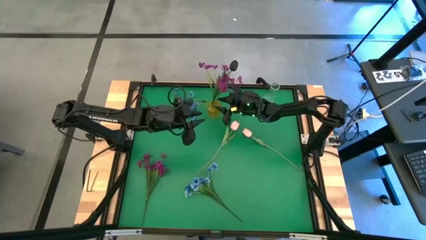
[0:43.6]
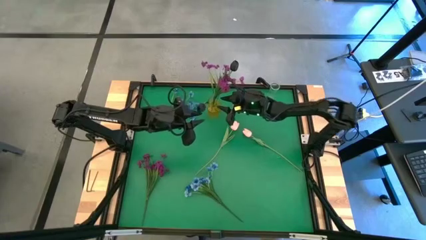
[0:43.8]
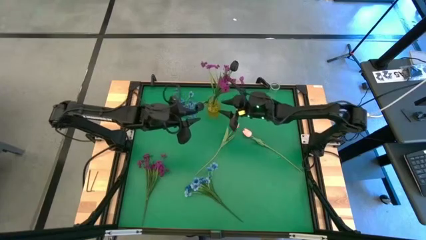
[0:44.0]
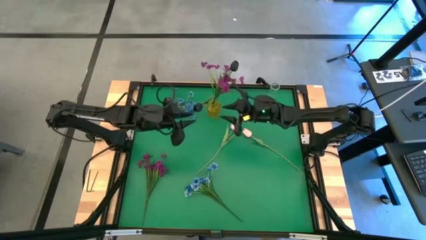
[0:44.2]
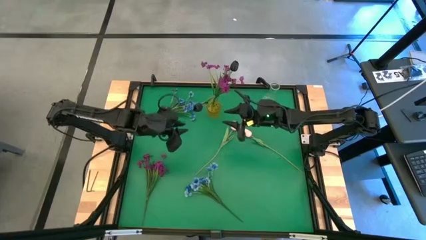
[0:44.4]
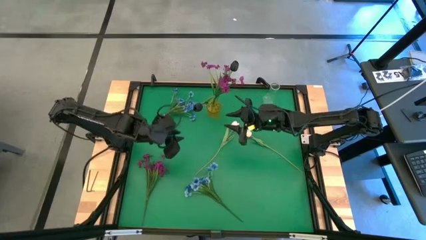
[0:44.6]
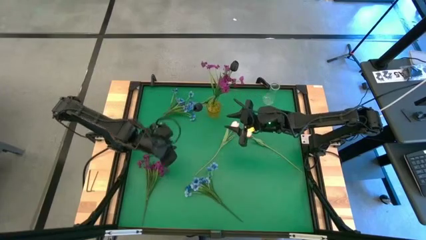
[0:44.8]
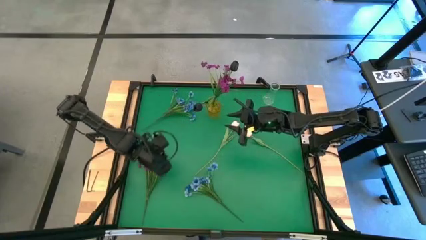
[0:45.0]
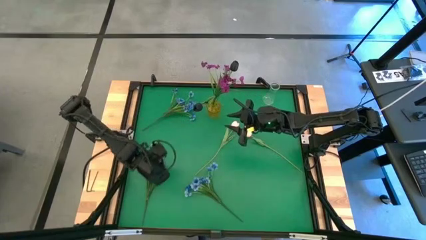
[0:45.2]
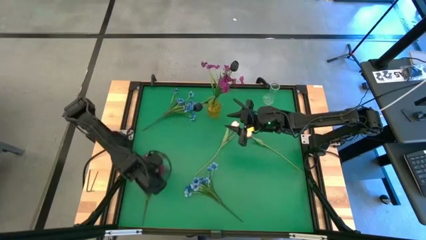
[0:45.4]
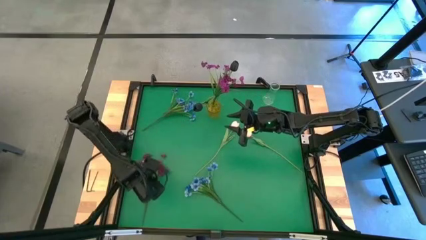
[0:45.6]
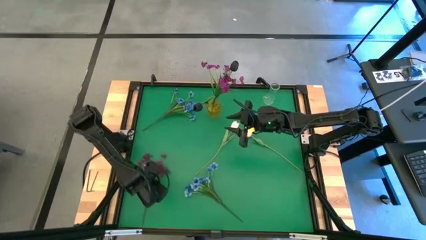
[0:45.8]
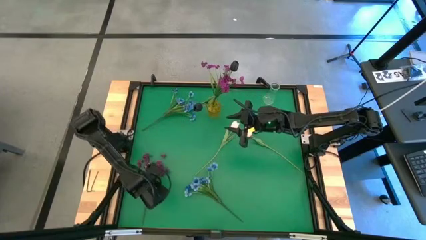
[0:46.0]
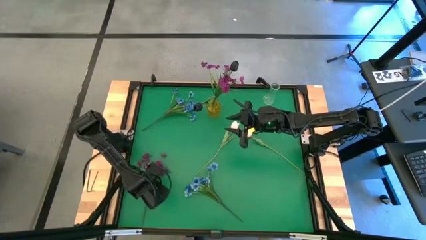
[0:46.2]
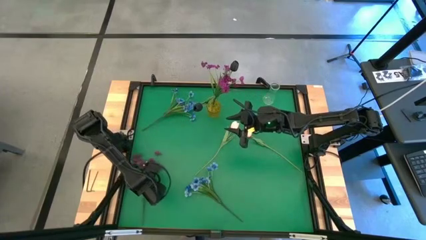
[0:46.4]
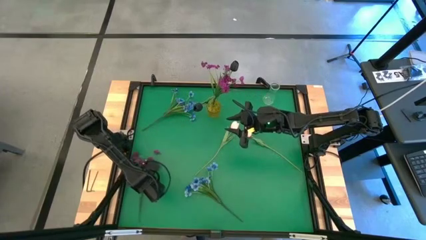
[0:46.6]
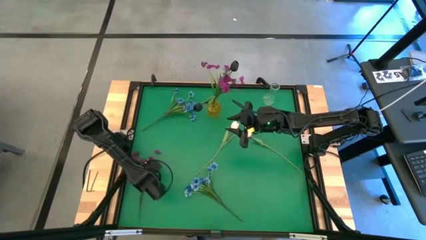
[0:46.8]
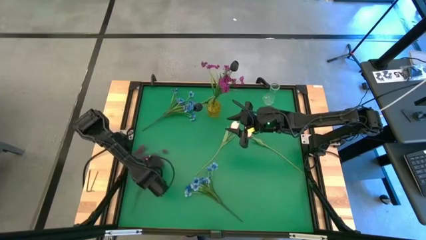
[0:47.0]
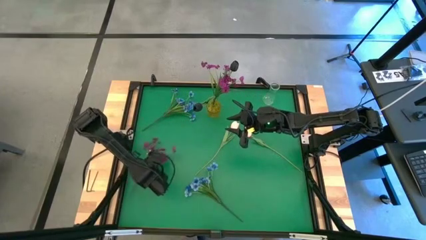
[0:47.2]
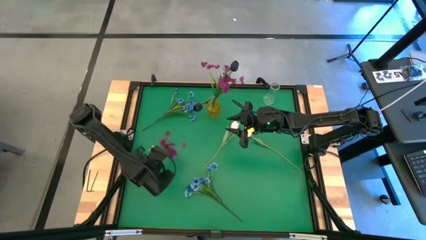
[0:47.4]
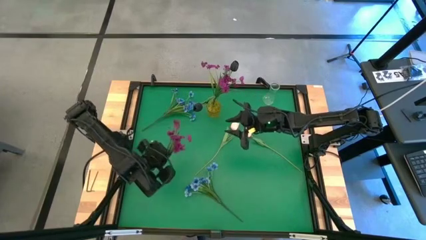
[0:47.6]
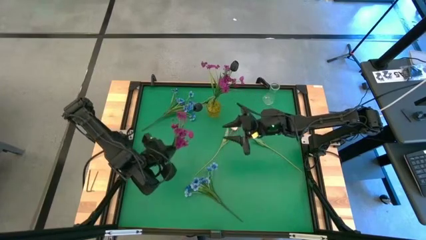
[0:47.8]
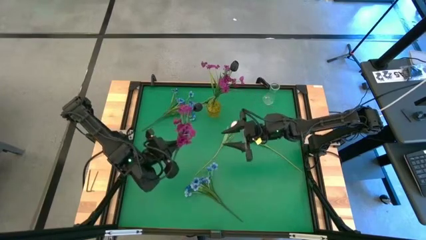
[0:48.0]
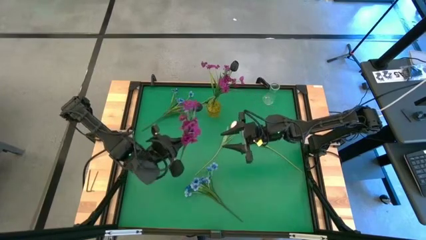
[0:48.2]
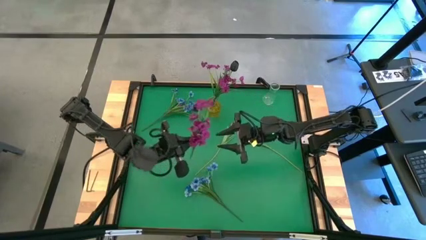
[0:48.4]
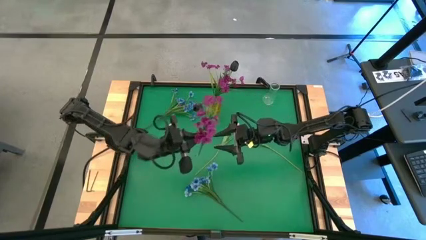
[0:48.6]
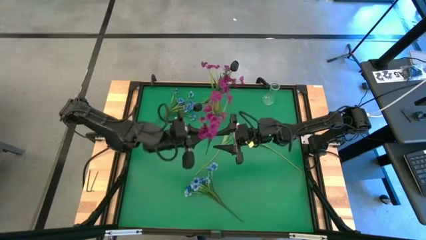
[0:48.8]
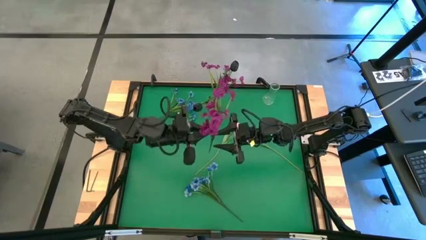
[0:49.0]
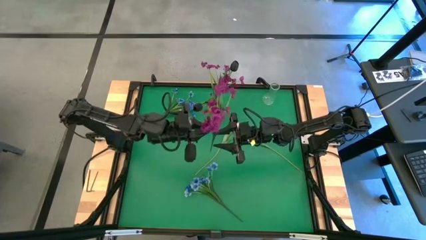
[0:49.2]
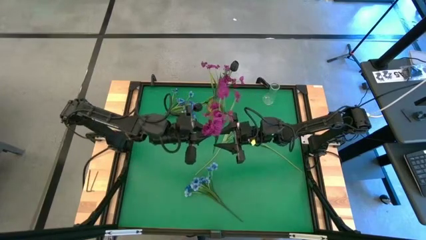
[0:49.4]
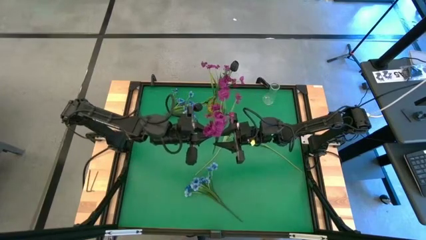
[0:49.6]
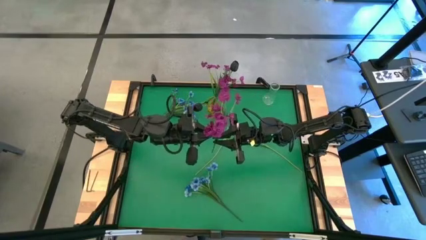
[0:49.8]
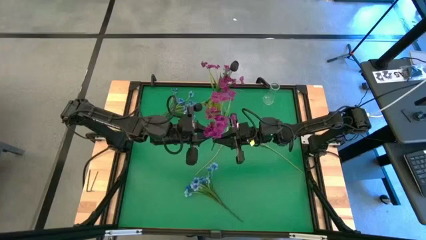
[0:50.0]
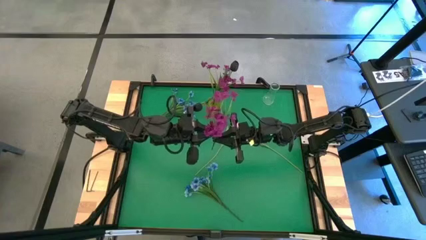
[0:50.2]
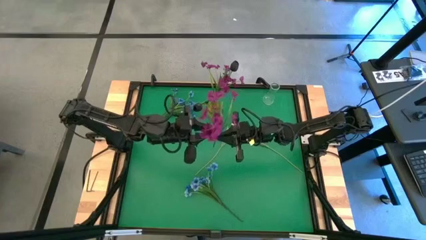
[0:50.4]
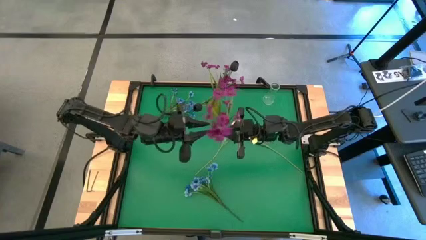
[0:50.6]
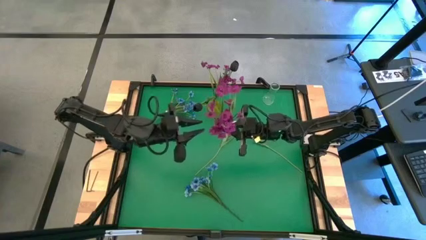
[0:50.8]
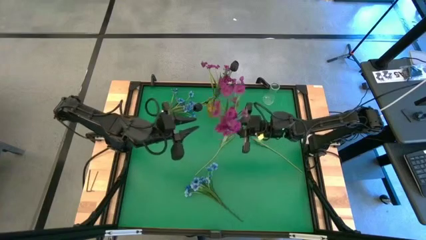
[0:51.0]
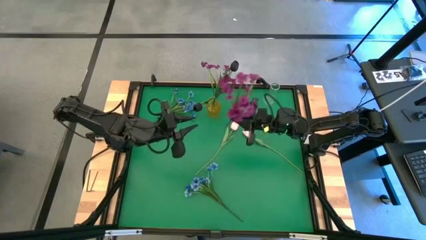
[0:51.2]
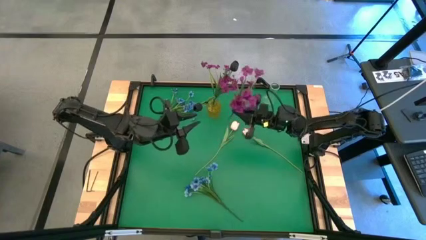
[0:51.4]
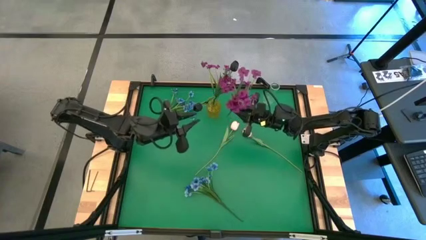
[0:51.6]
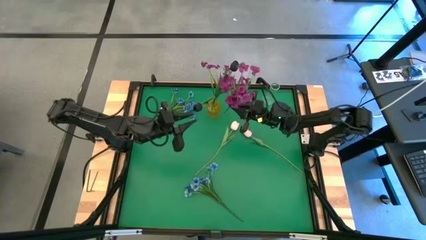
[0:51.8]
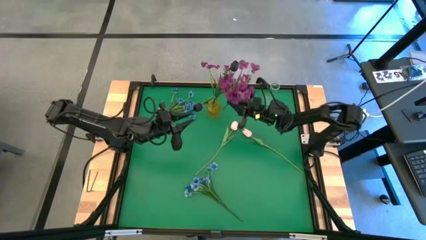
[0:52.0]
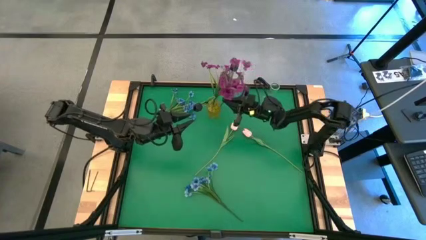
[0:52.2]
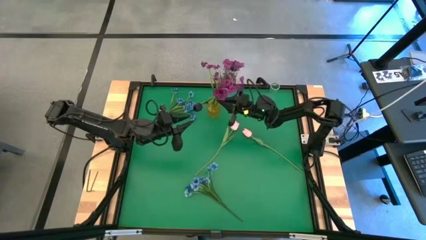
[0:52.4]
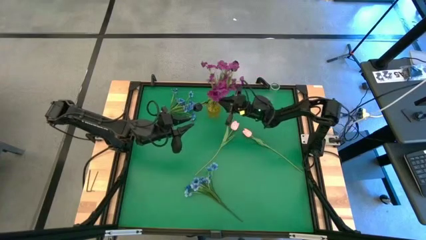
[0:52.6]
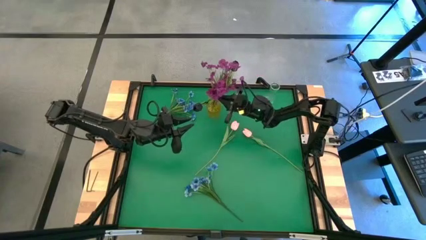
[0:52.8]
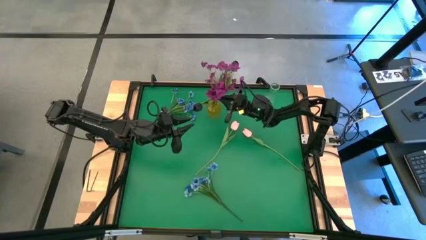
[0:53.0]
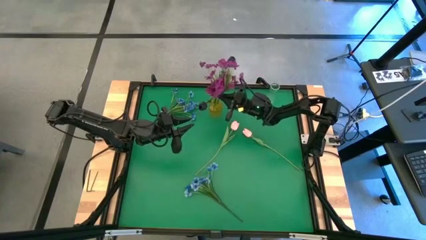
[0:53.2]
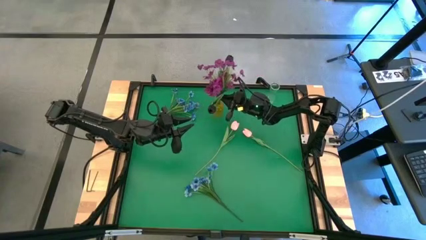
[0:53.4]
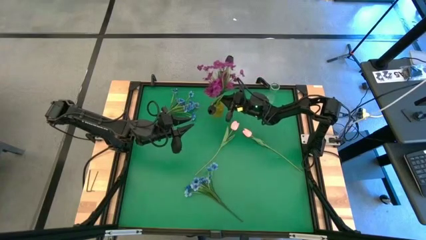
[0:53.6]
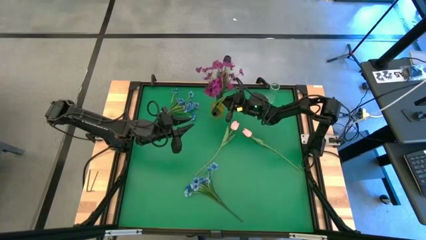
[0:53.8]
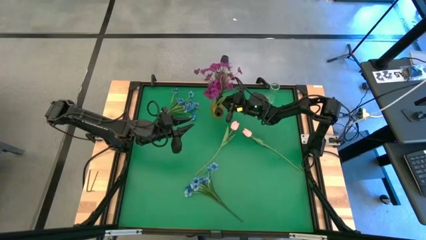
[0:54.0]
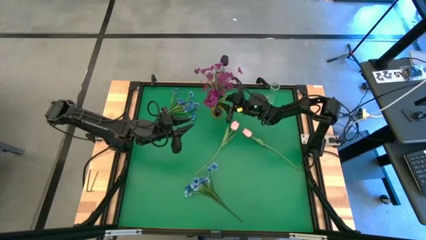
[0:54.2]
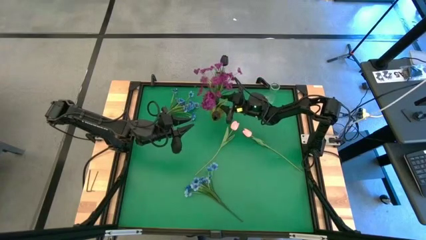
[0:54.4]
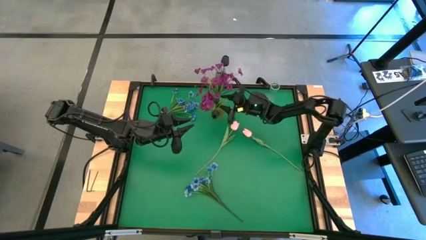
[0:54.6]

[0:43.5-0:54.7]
Task: Sort flowers into vase by color
Put the purple flowers into the yellow vase

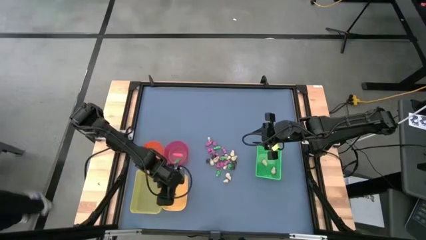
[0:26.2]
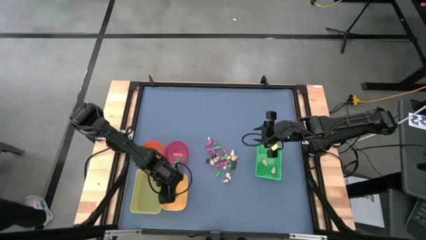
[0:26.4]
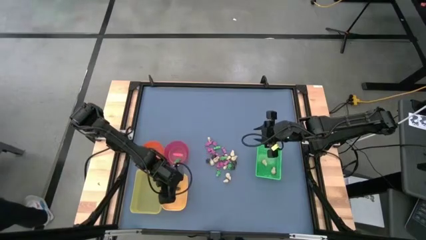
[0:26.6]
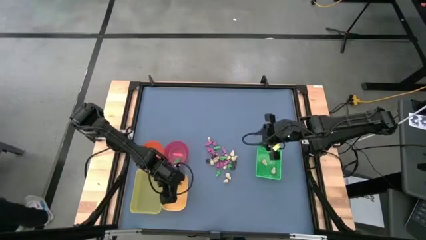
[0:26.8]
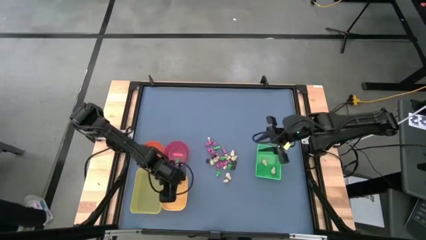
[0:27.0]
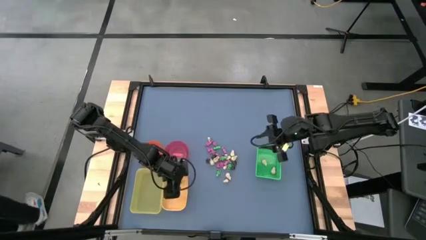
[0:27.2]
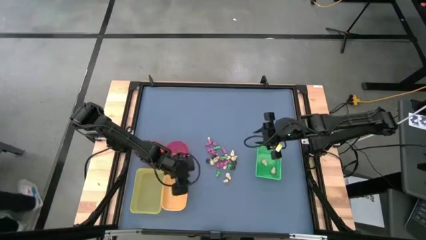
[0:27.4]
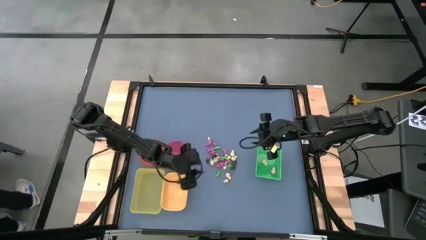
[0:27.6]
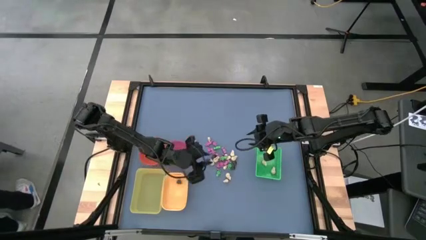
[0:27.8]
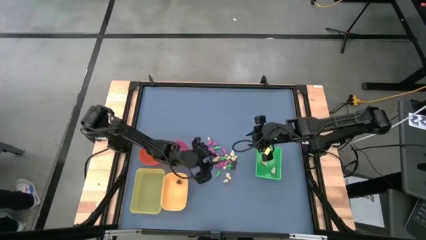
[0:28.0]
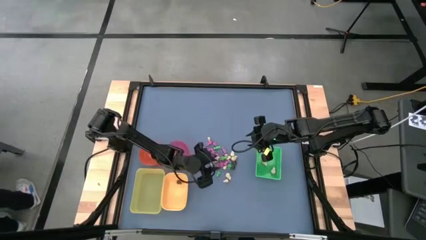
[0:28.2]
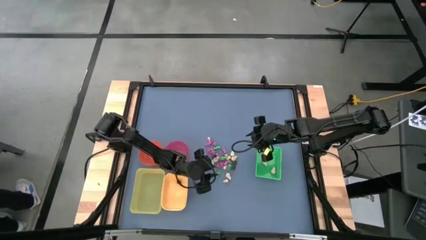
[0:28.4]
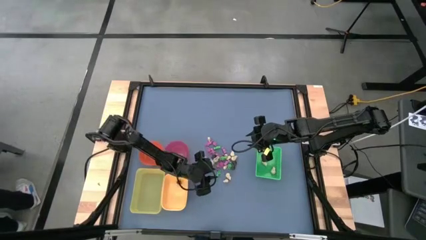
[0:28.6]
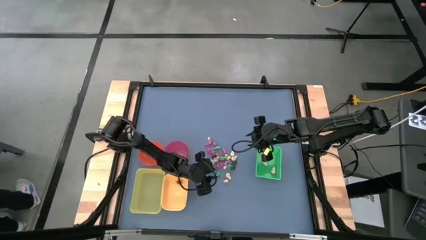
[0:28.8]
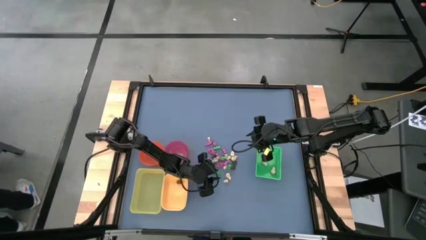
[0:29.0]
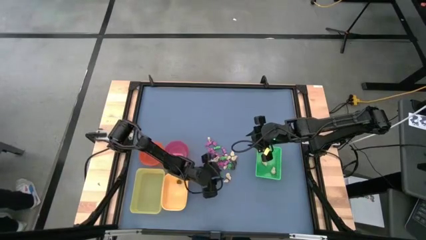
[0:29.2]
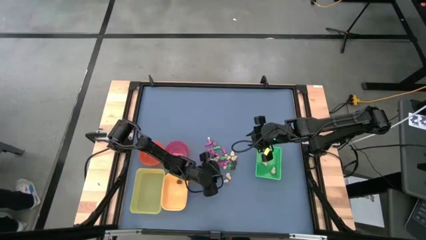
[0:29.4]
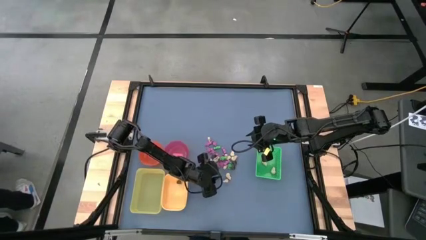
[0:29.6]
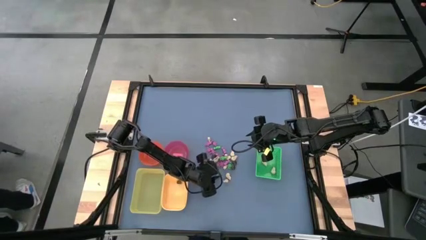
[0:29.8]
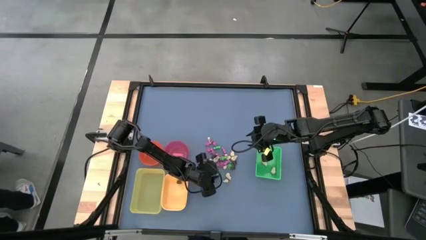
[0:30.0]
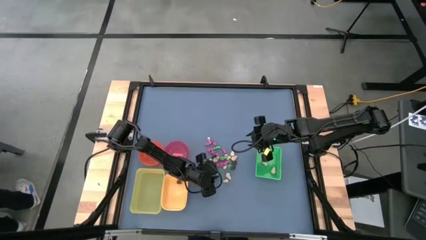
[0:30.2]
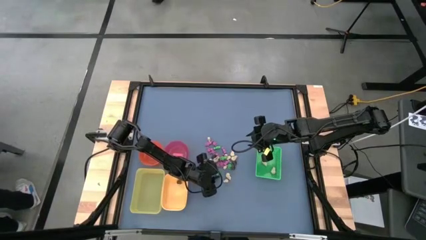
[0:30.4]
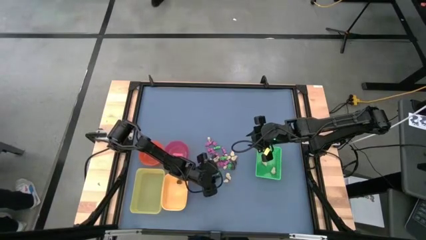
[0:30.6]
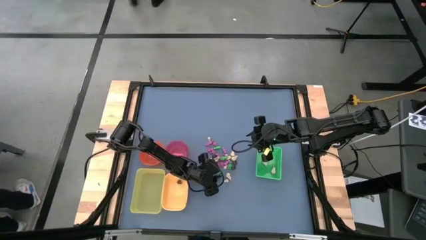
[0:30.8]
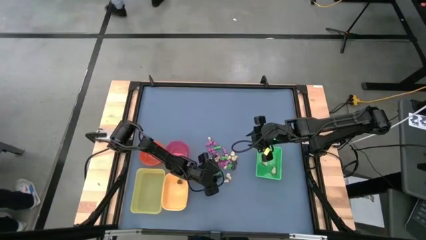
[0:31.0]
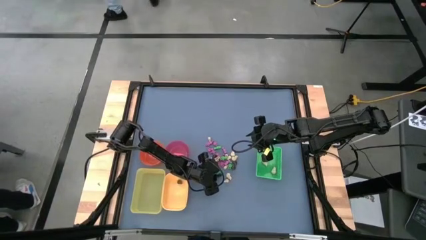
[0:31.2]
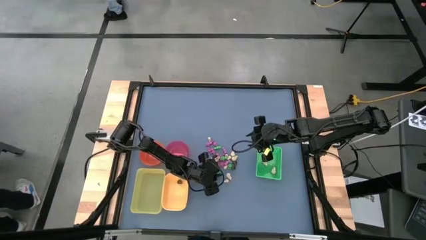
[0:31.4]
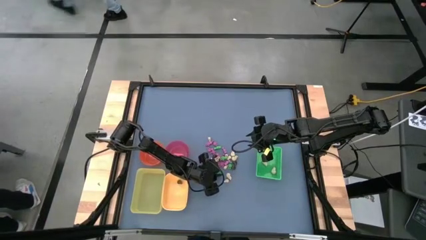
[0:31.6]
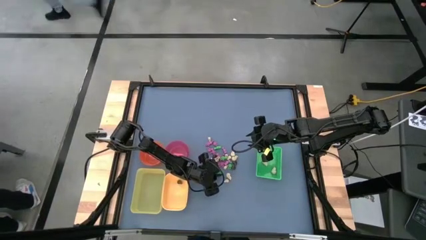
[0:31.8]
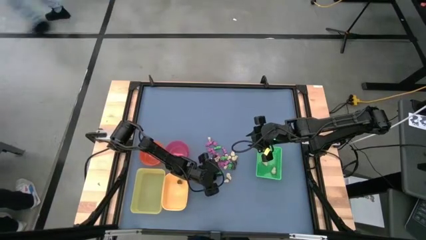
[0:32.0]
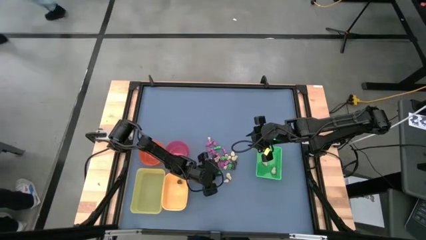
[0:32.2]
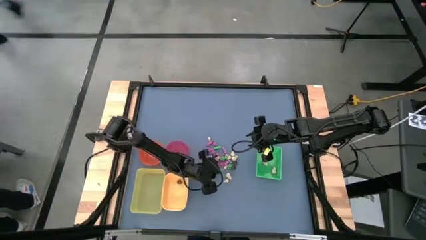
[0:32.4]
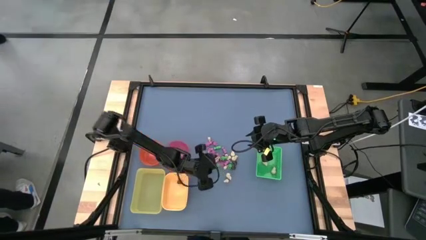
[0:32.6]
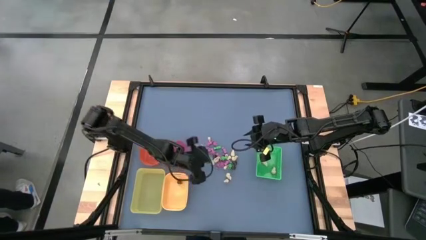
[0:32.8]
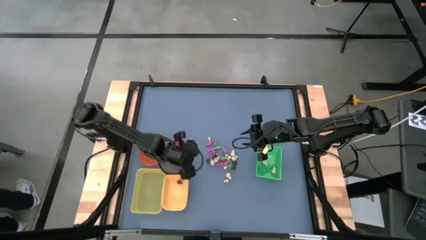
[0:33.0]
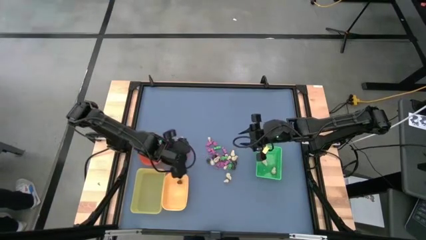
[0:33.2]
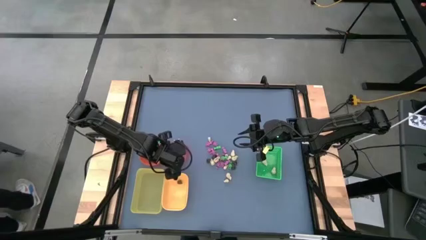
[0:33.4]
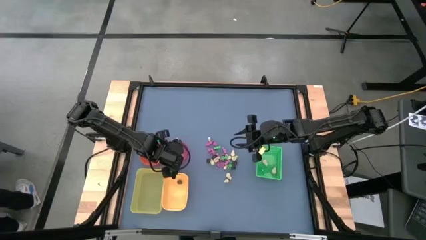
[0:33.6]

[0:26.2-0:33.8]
Task: Sort Halloween decoration
Put the green skeleton toy into the red bowl
